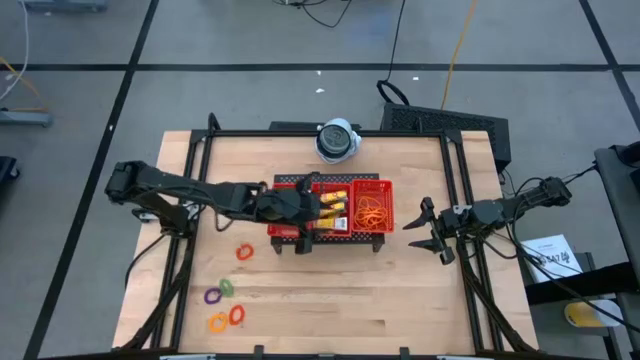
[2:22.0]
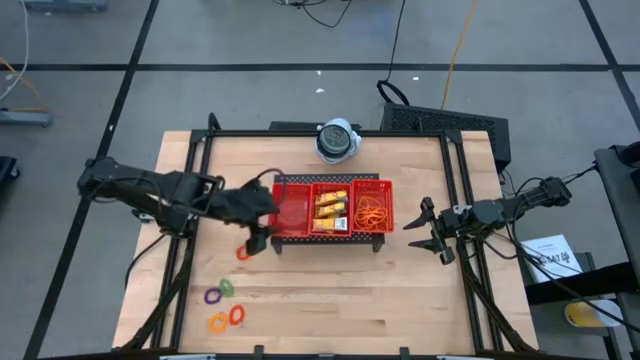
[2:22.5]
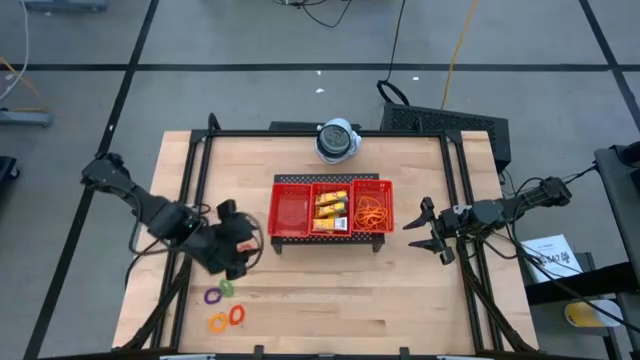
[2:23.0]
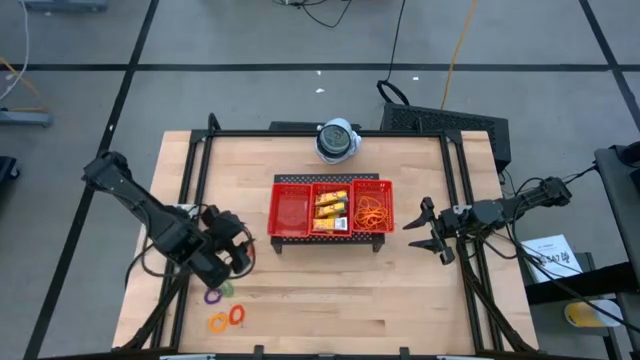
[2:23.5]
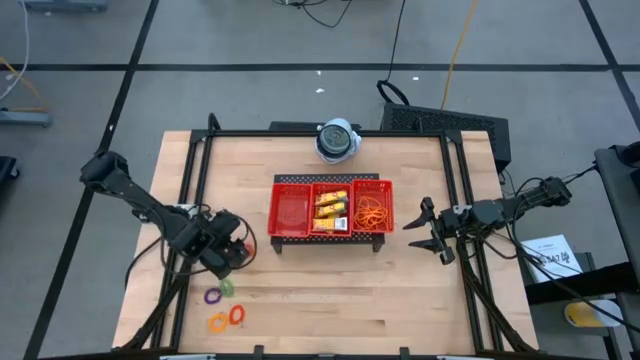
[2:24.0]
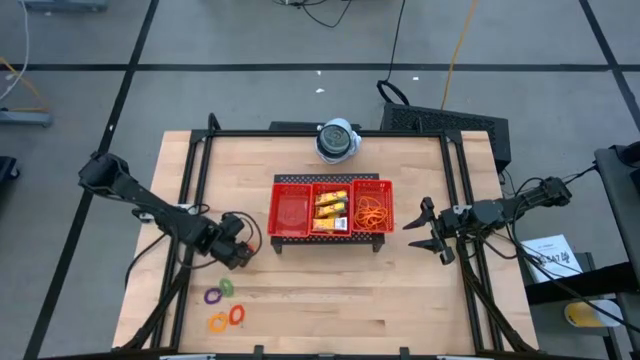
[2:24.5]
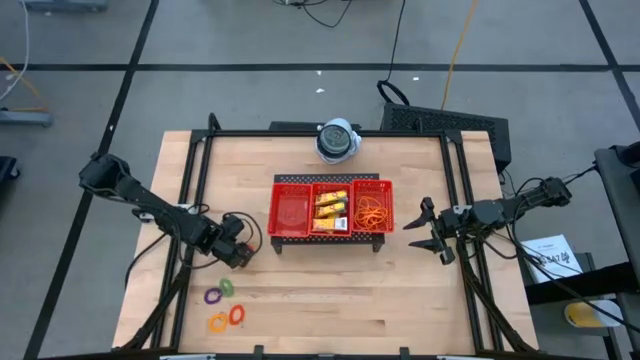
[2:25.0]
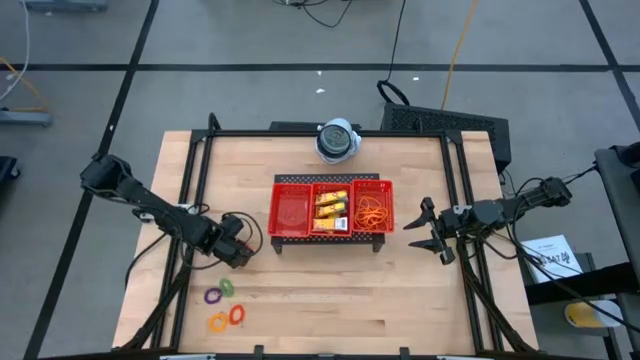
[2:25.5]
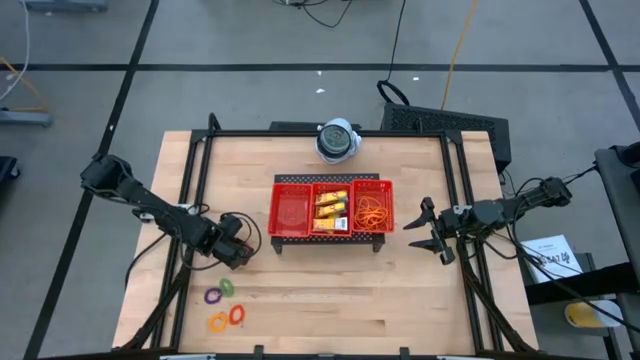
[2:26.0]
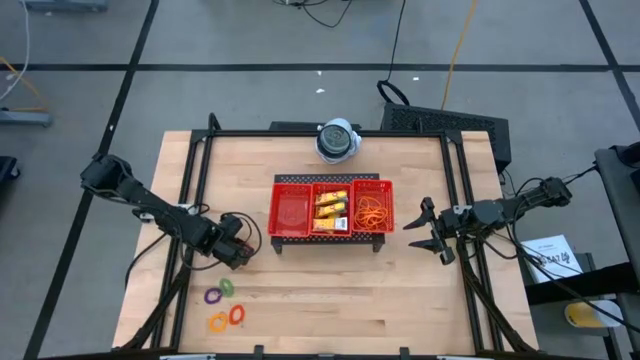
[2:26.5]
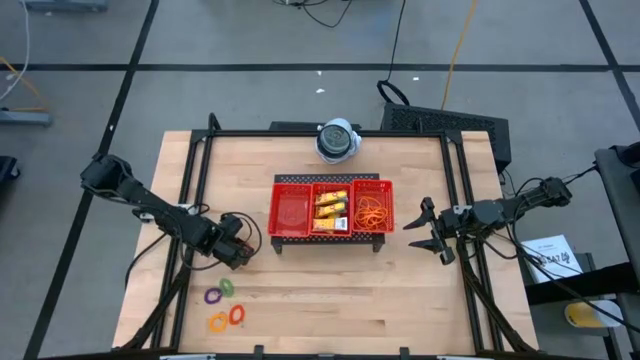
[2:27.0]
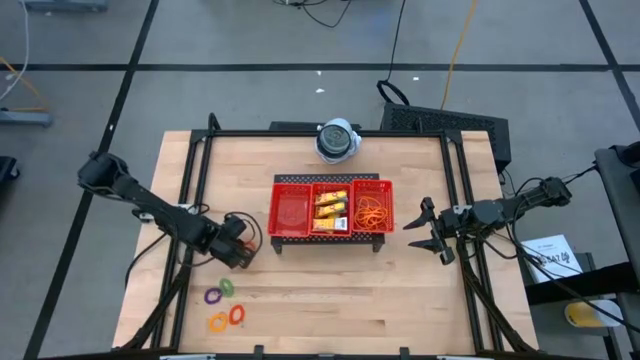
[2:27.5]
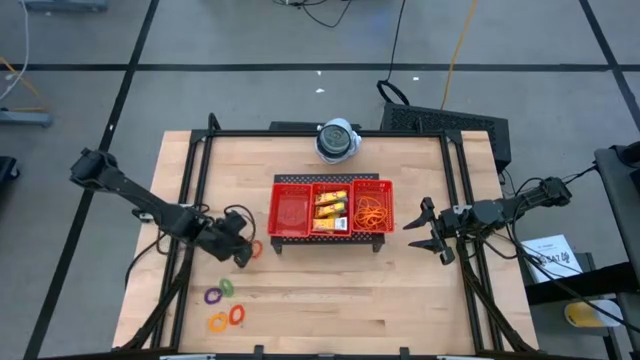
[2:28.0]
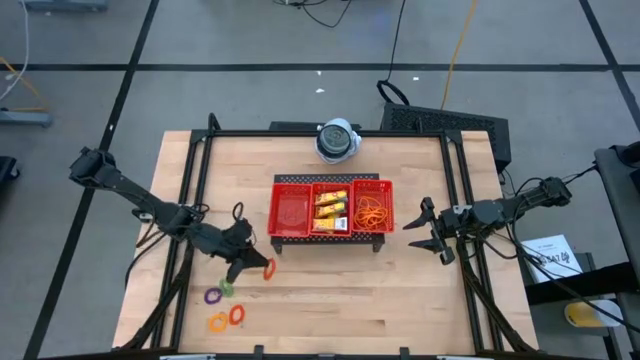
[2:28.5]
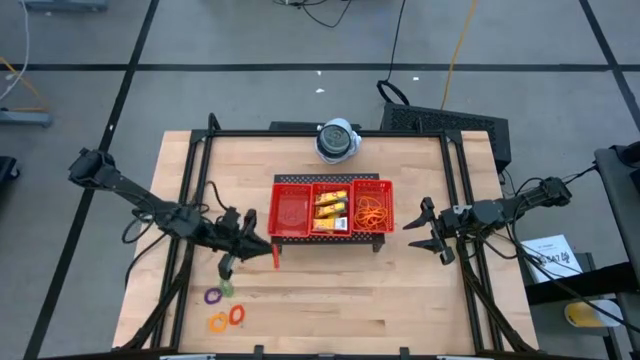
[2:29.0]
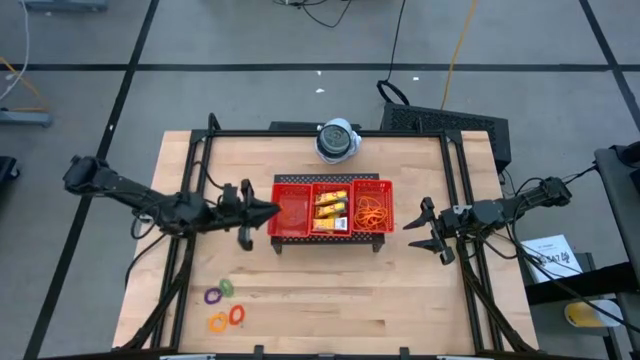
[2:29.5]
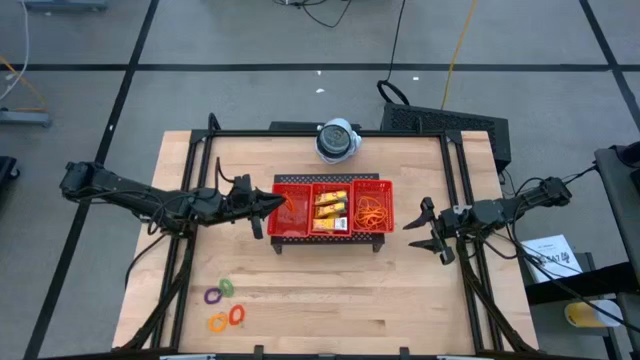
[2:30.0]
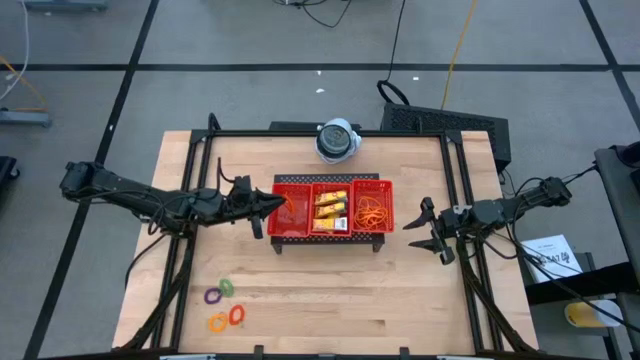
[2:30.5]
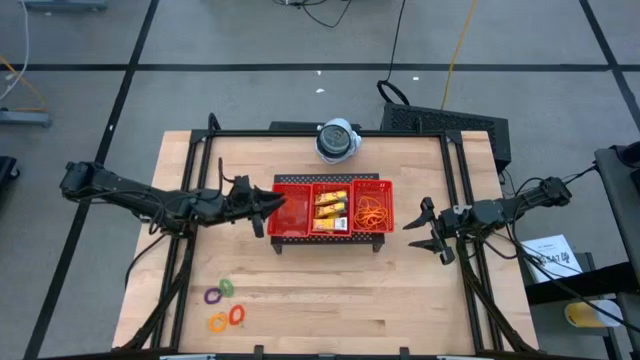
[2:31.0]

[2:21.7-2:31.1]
Task: Pick & Place Office Desk Supplies
Put the top orange spring keychain into the left red bin

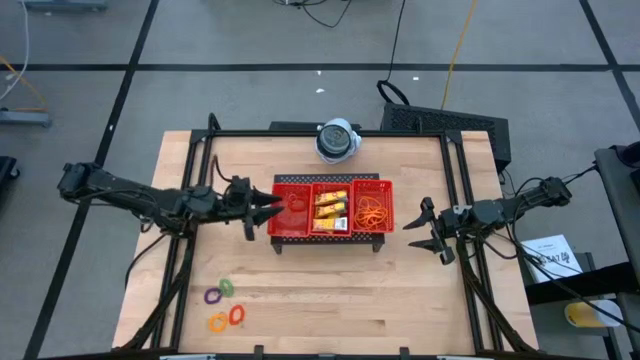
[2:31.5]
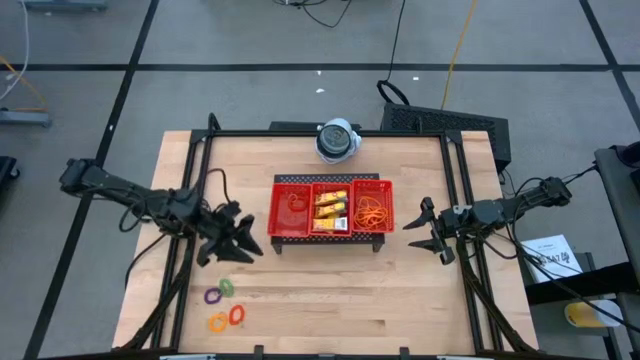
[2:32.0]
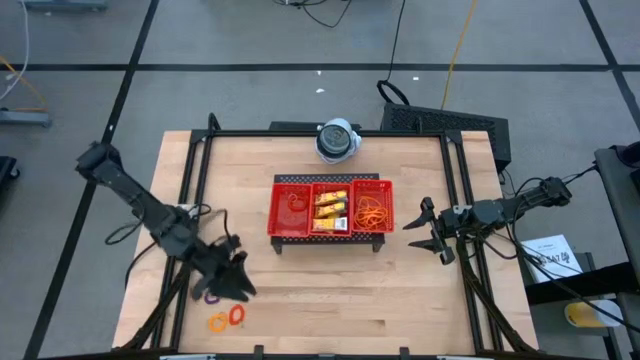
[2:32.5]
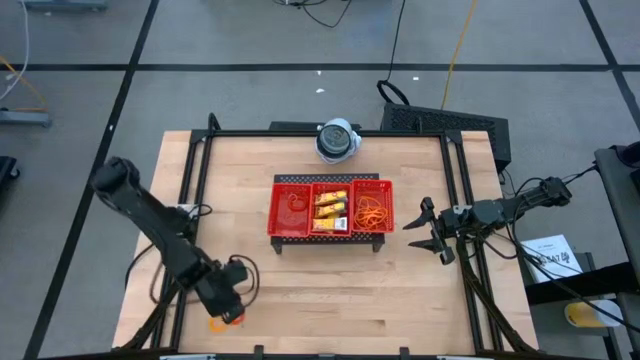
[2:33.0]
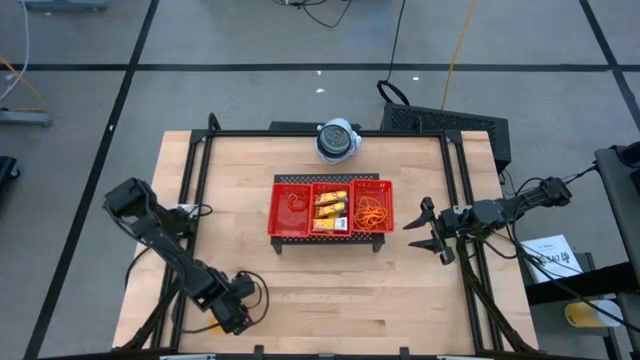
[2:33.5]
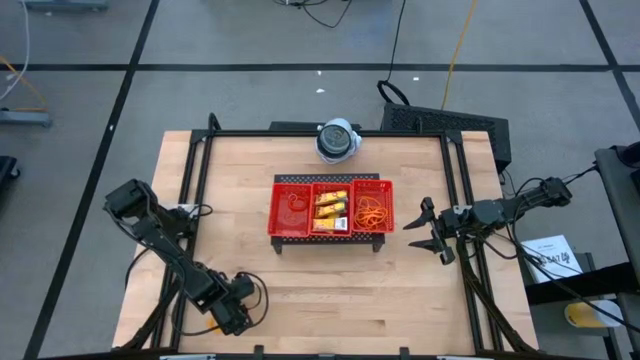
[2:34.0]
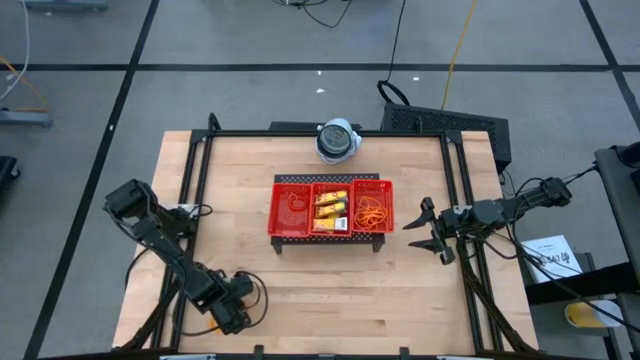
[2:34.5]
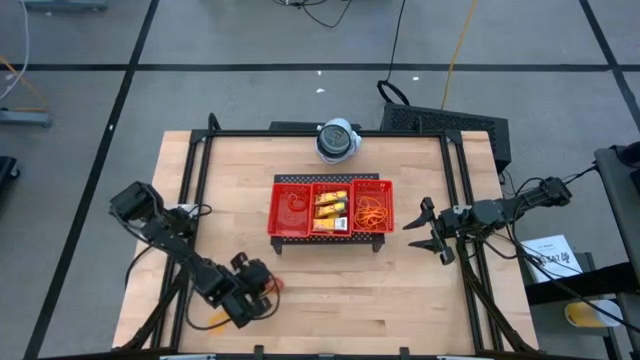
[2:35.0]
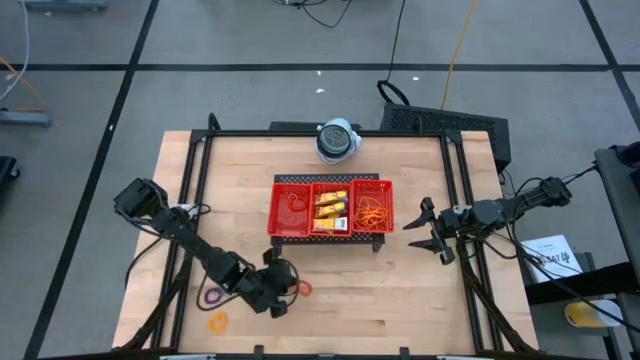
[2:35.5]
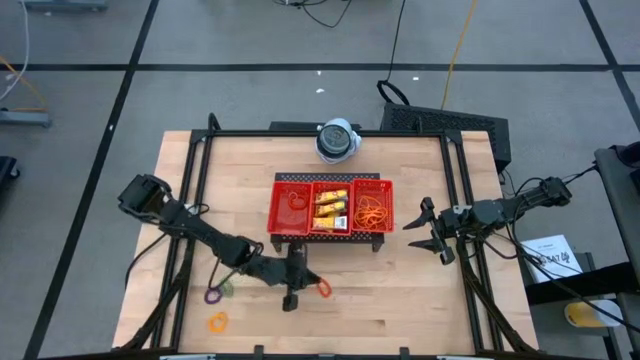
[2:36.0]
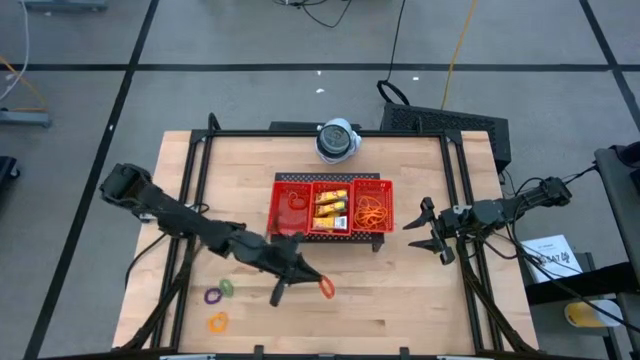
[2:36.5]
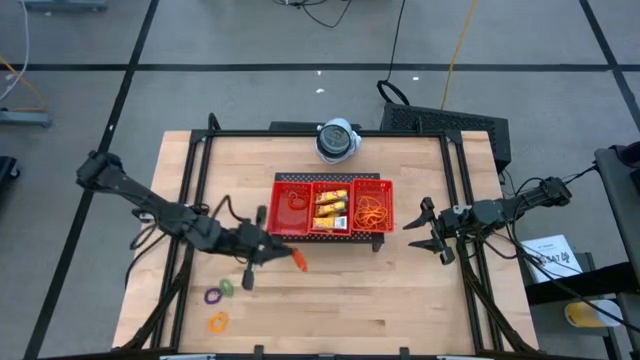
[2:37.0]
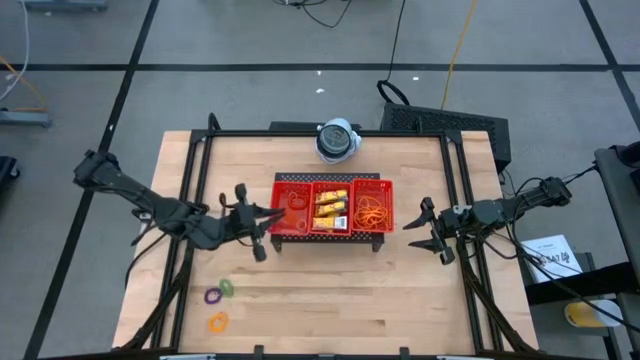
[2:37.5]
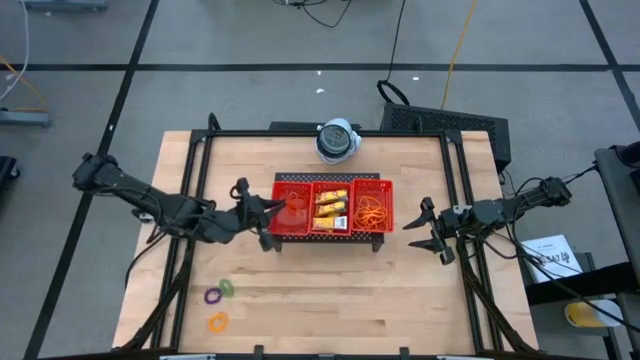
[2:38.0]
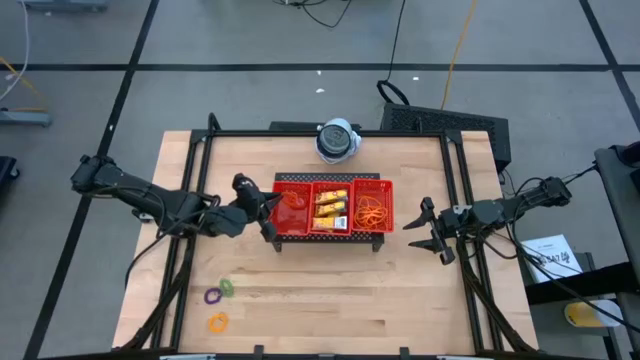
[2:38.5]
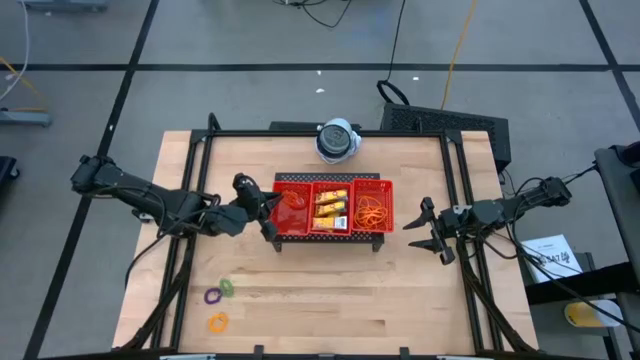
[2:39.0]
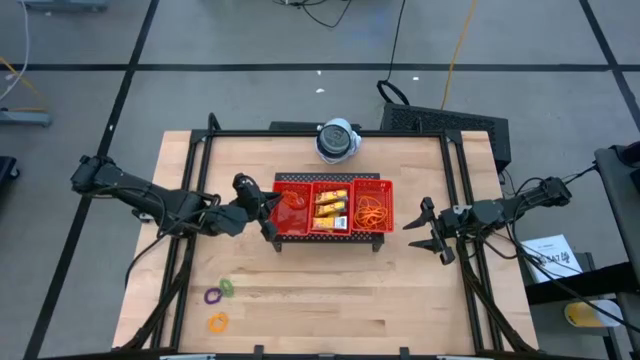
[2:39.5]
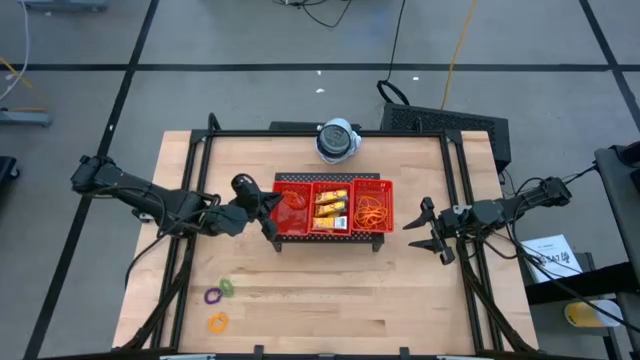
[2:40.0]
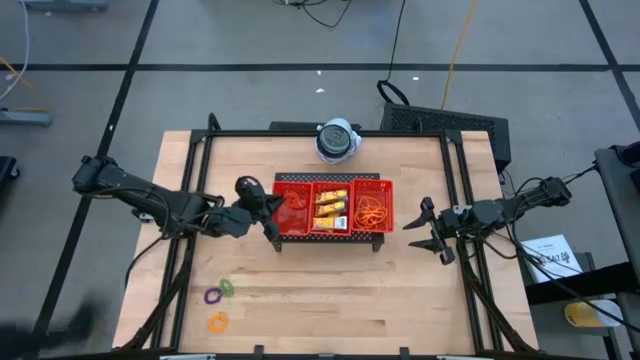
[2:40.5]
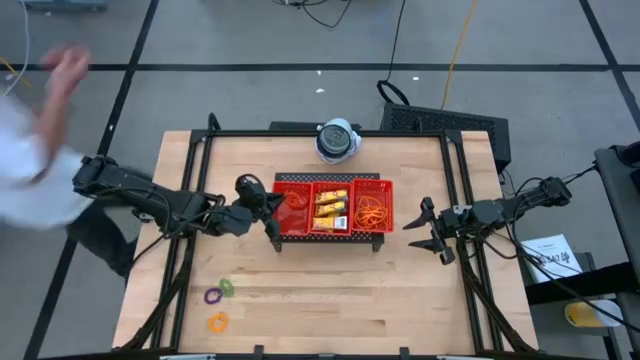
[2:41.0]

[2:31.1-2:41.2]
Put the orange spring keychain into the left red bin

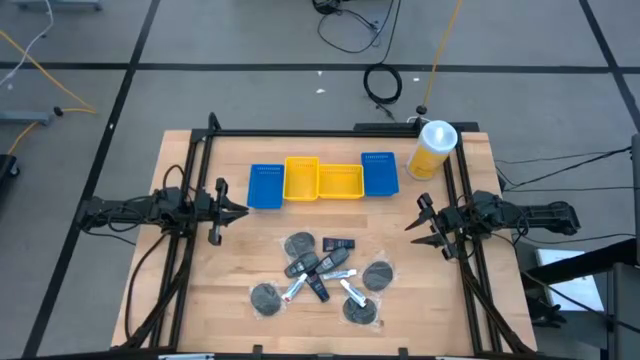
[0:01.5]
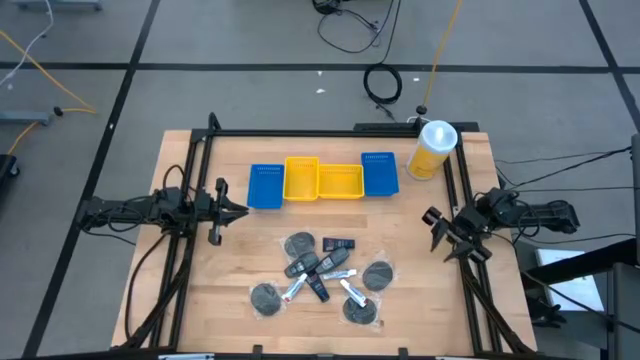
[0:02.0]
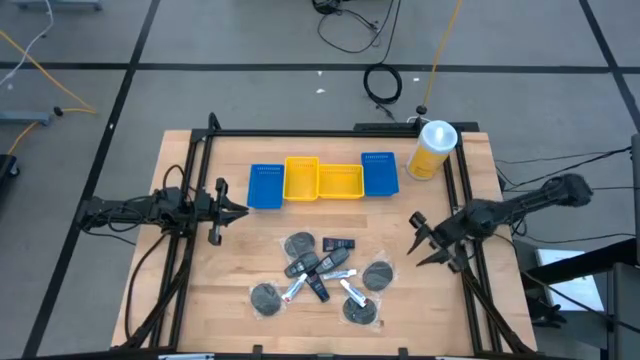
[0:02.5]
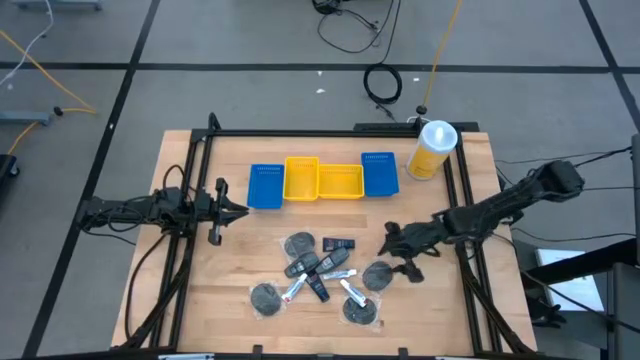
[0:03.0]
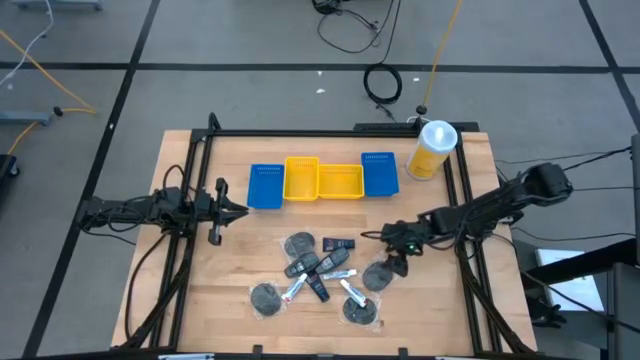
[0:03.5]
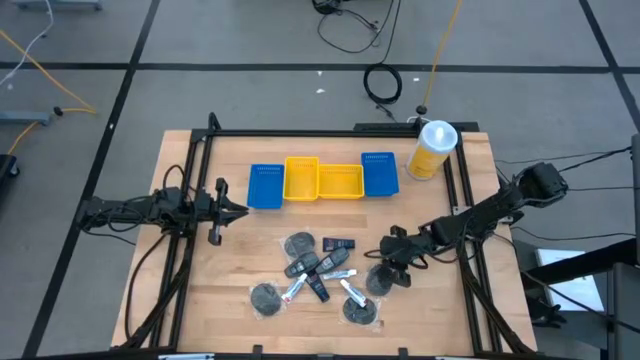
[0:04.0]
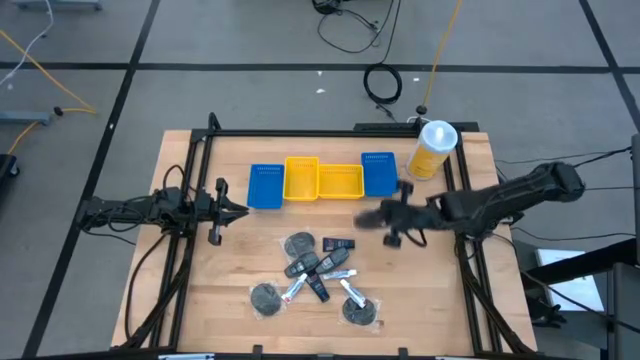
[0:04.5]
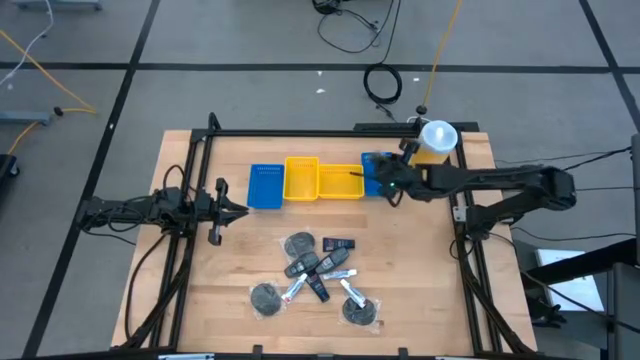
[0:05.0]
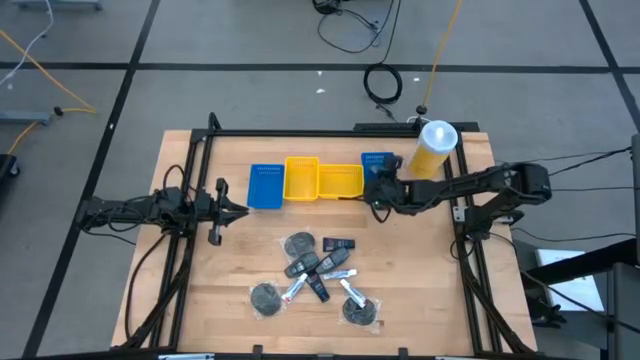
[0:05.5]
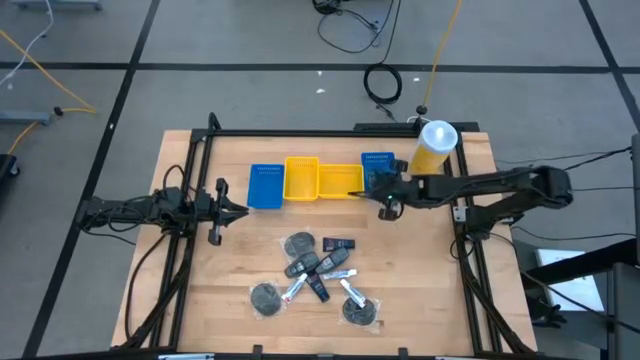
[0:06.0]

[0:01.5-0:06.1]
Task: Pick & Place Travel size toiletries
Put the hairbrush into the right blue basket
